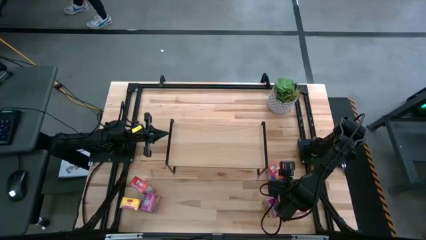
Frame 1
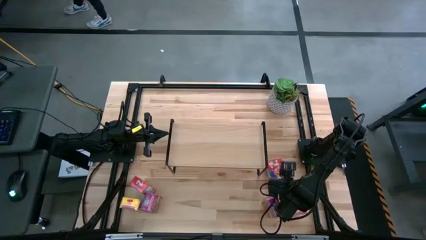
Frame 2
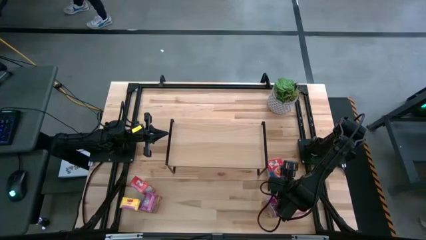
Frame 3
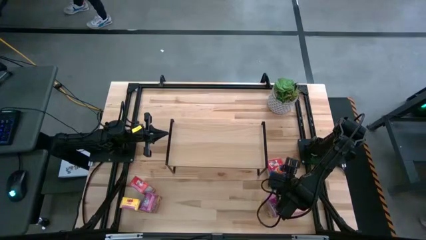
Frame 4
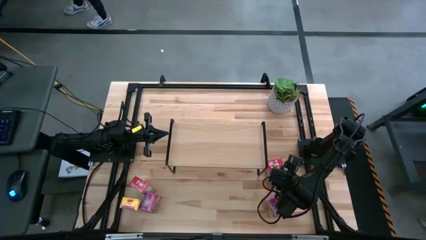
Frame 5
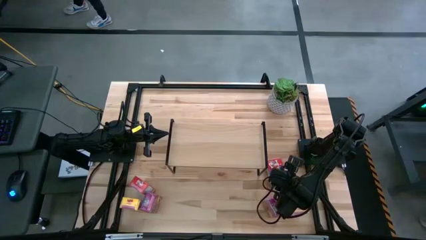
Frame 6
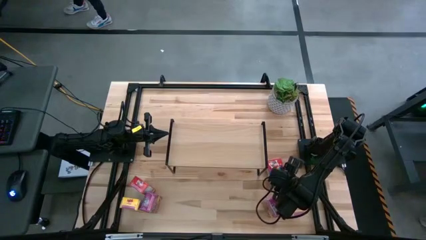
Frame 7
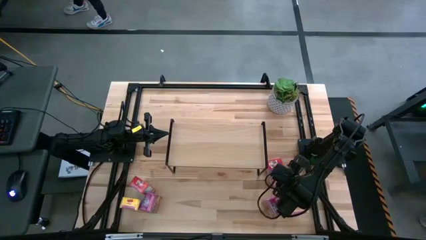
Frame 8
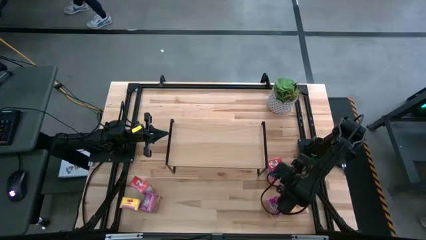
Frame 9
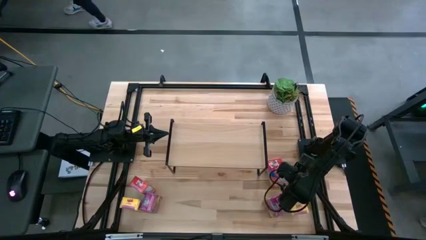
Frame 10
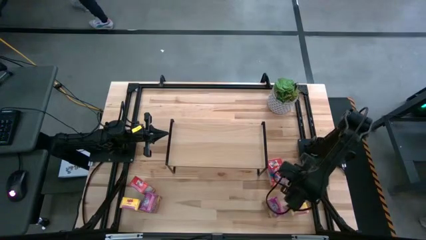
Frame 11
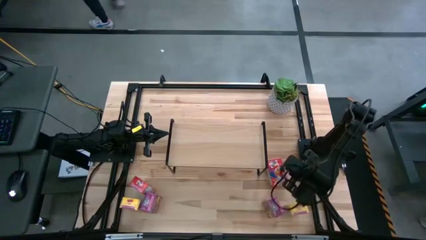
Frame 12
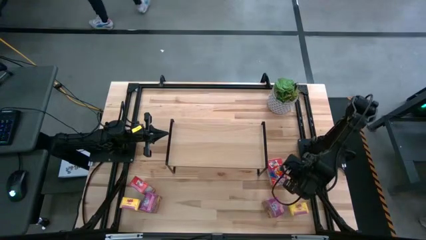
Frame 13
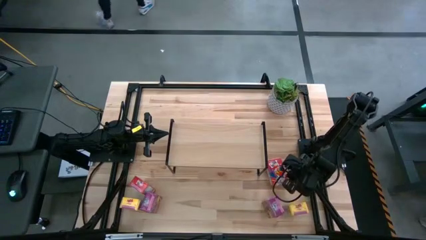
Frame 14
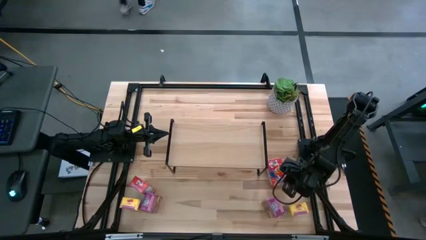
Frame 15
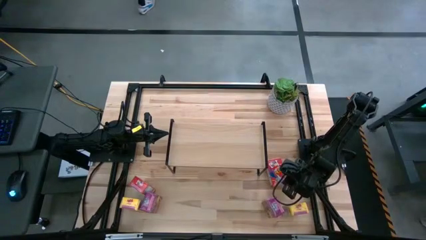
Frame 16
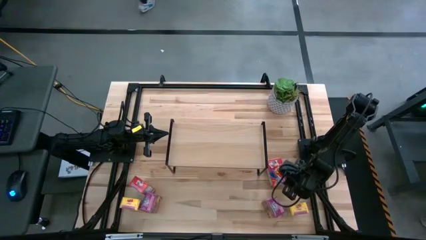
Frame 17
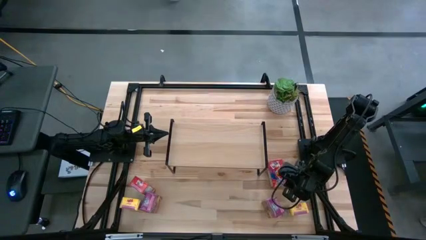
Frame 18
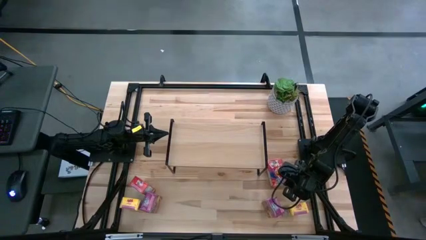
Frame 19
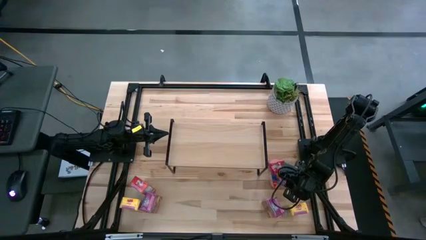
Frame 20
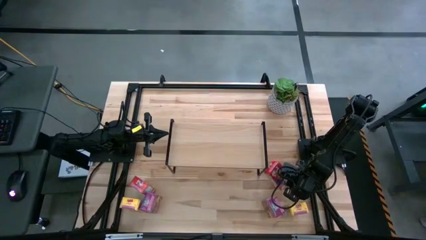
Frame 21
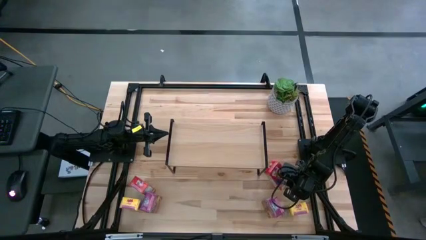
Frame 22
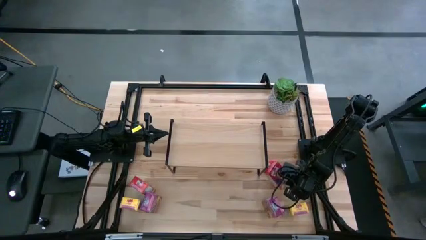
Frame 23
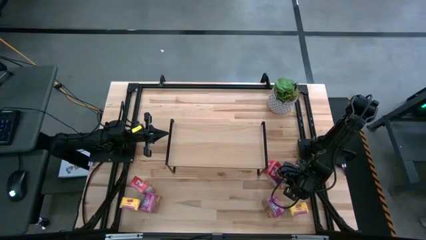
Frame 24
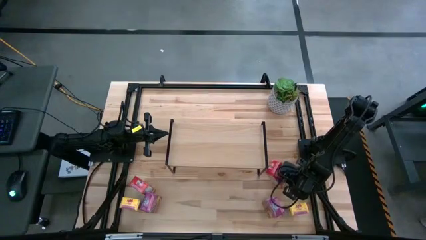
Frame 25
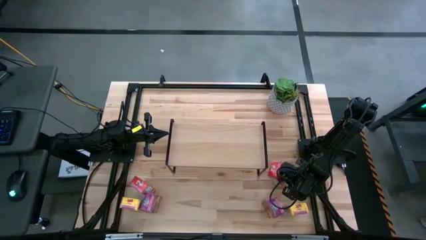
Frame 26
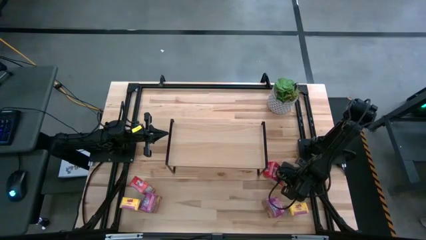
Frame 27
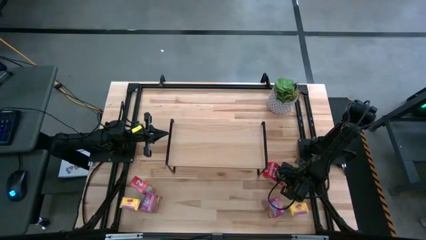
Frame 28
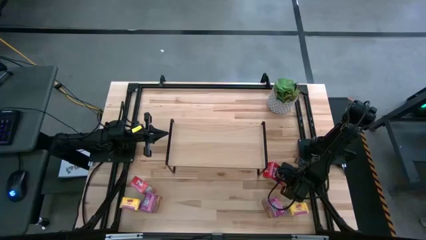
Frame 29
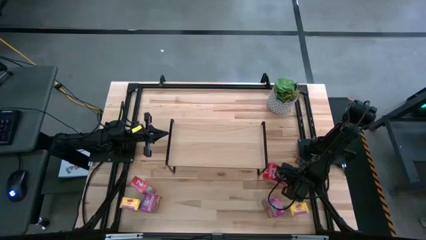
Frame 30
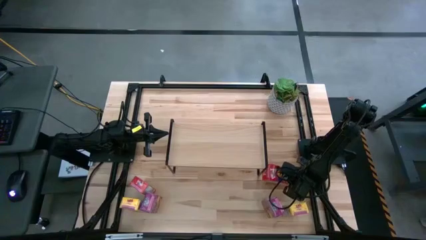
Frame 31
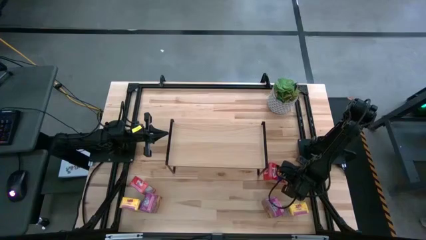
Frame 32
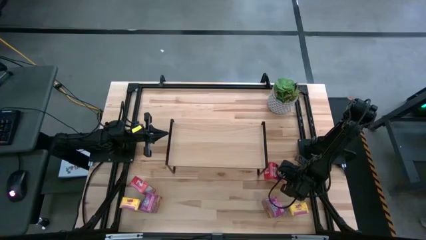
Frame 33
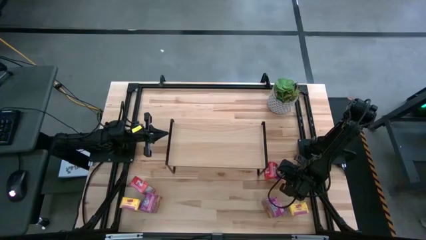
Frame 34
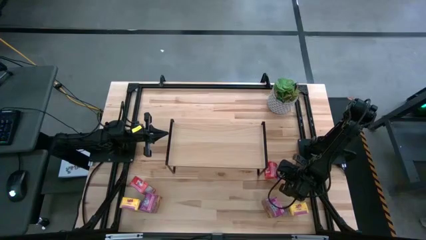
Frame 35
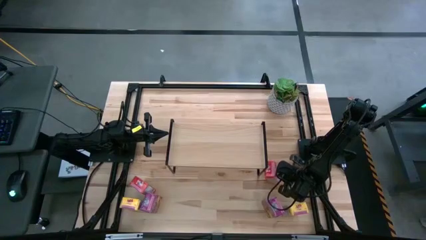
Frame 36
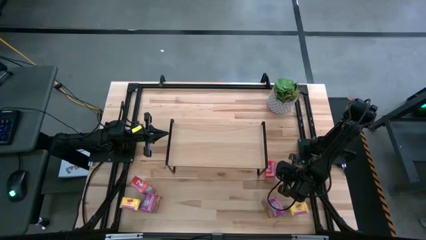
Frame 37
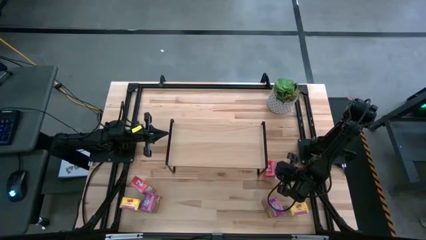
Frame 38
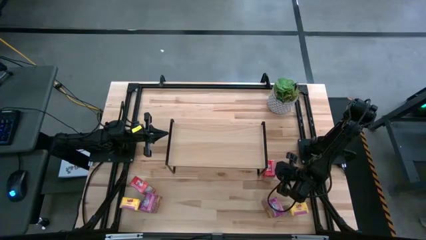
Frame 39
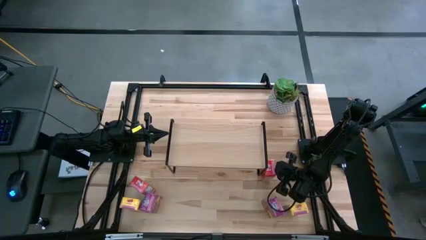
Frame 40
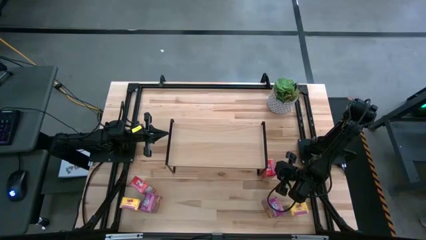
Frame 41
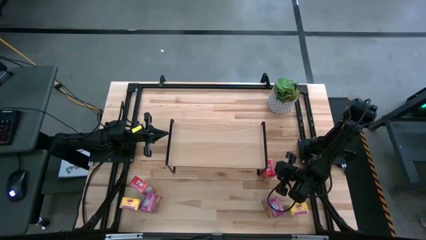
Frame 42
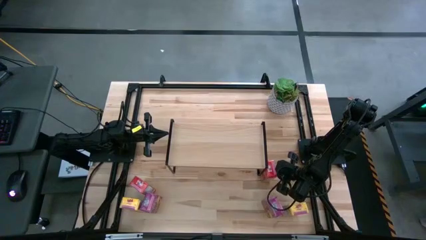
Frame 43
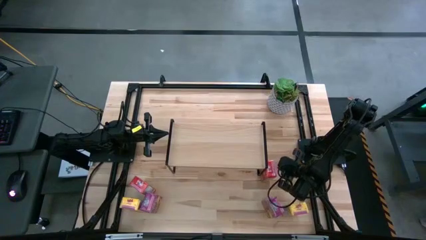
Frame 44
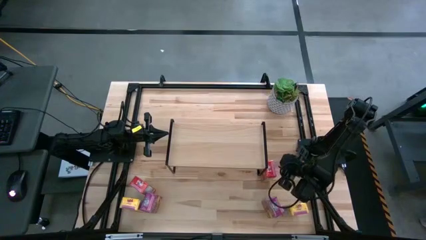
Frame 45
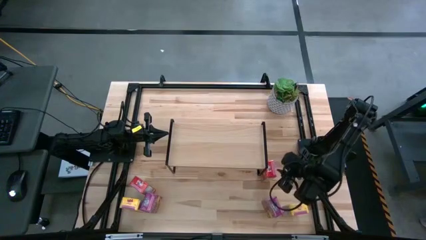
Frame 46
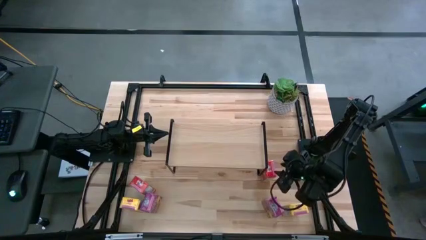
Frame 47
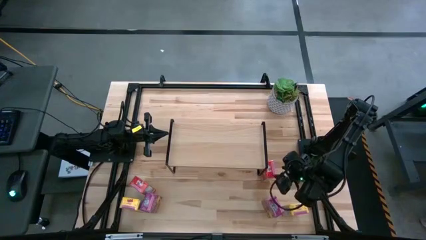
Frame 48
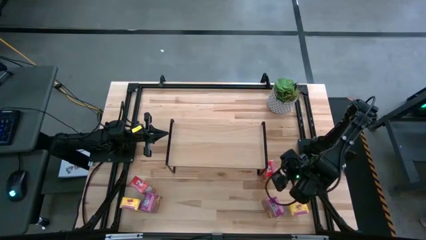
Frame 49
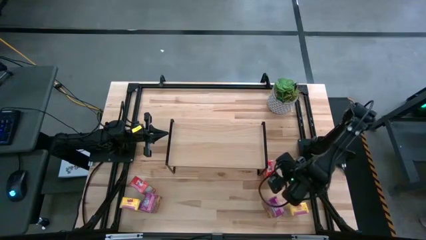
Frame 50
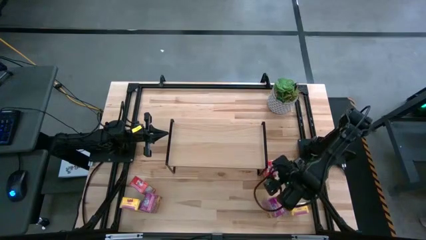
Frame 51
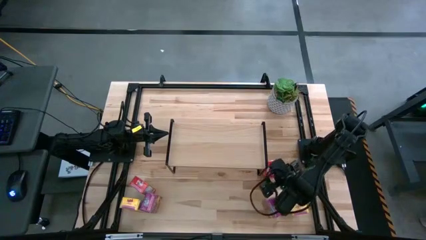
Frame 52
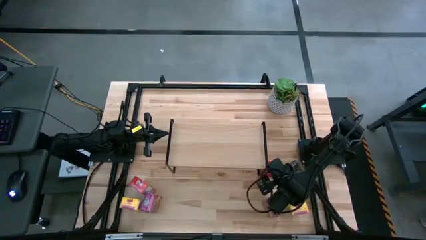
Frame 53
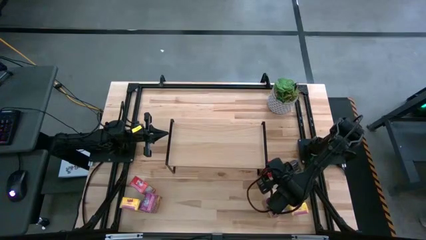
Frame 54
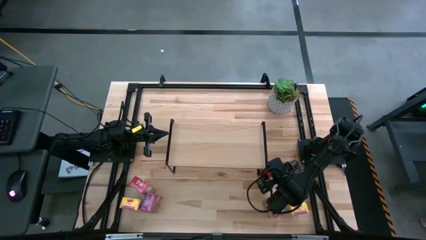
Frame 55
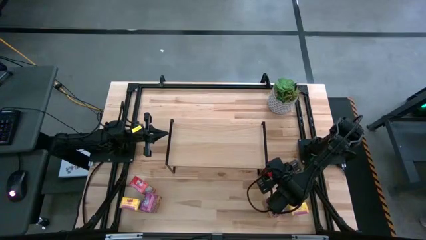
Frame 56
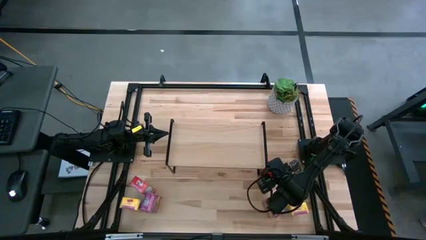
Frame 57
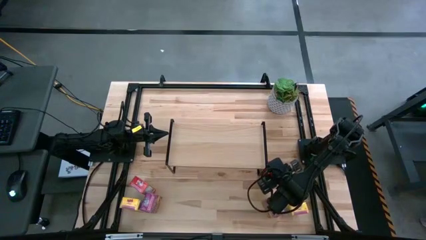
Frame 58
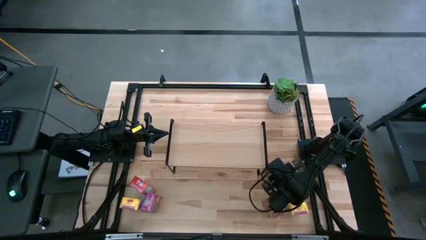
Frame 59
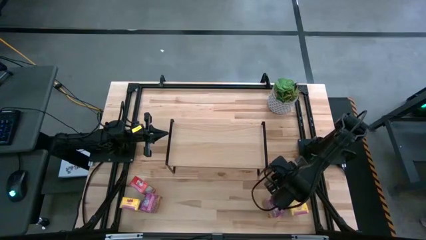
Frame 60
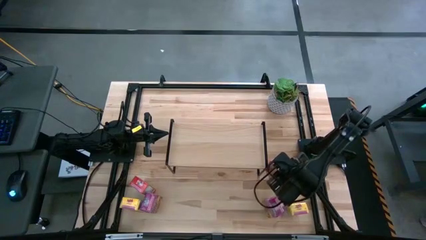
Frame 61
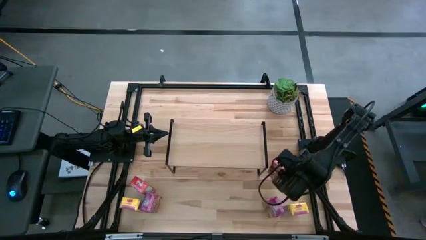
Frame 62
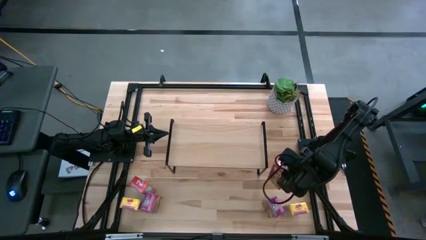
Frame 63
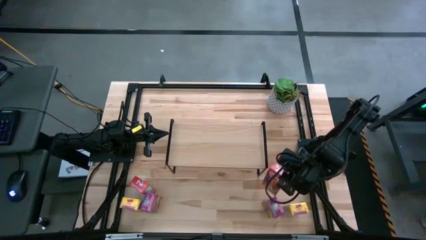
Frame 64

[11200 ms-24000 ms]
Task: Stack cereal on shelf
Put the right red cereal box on the shelf
